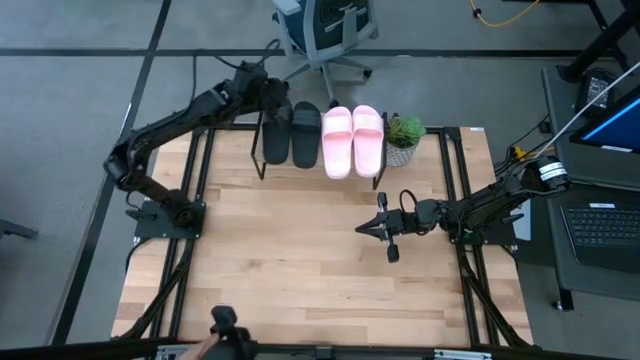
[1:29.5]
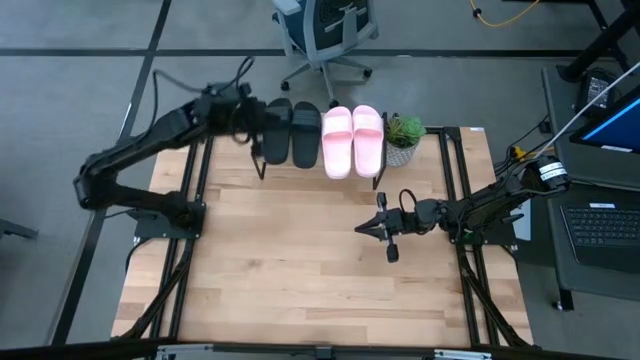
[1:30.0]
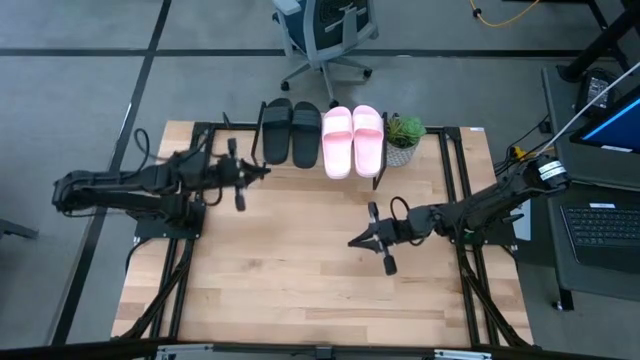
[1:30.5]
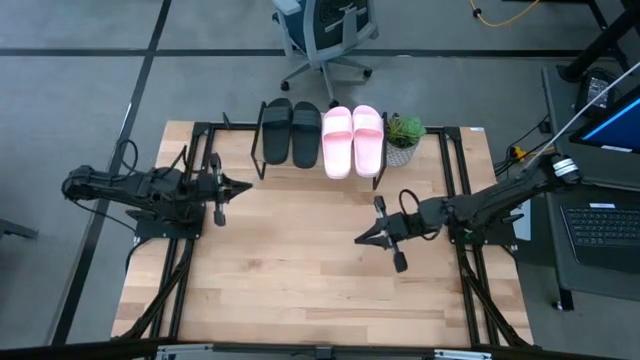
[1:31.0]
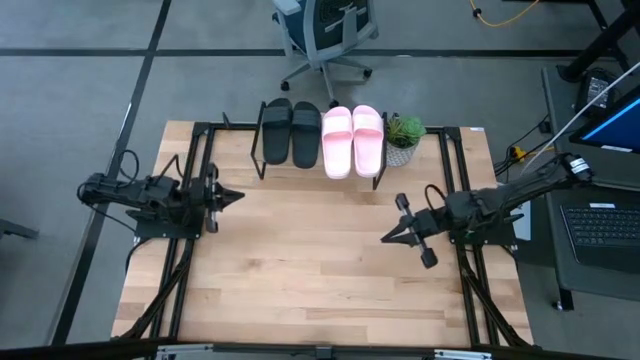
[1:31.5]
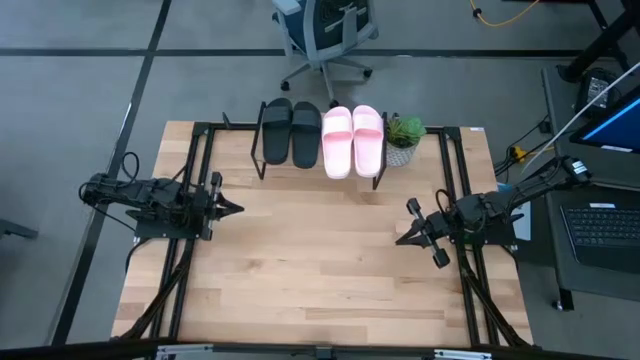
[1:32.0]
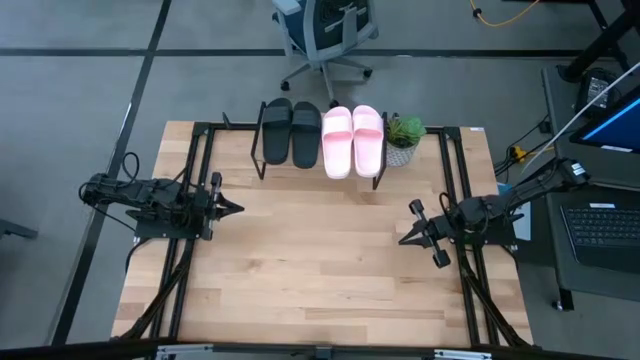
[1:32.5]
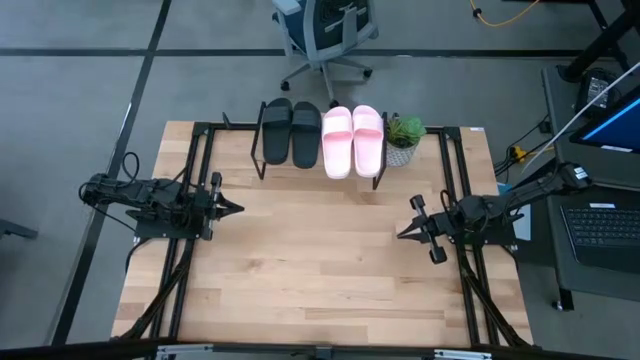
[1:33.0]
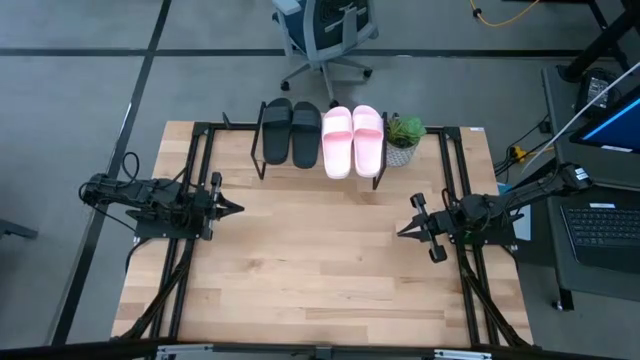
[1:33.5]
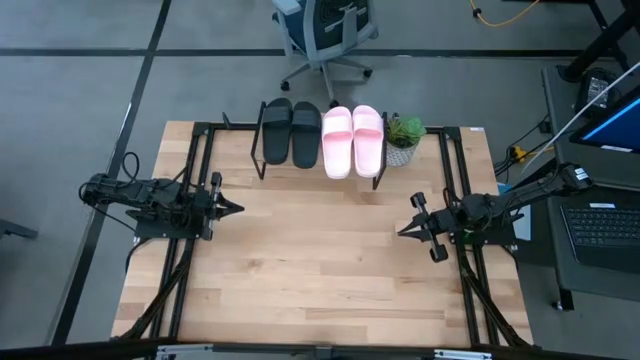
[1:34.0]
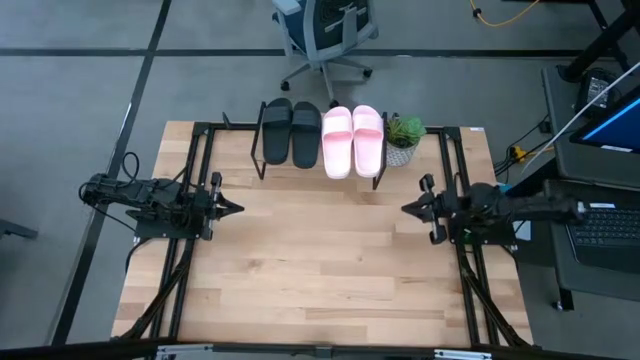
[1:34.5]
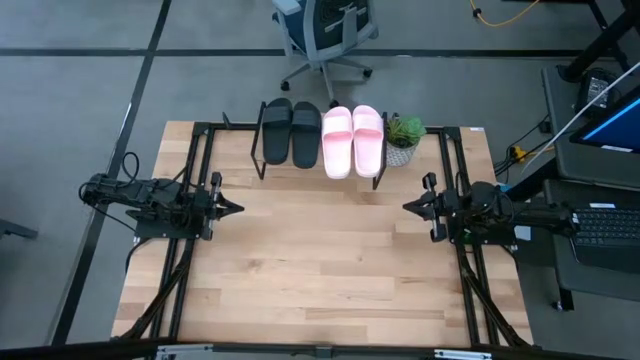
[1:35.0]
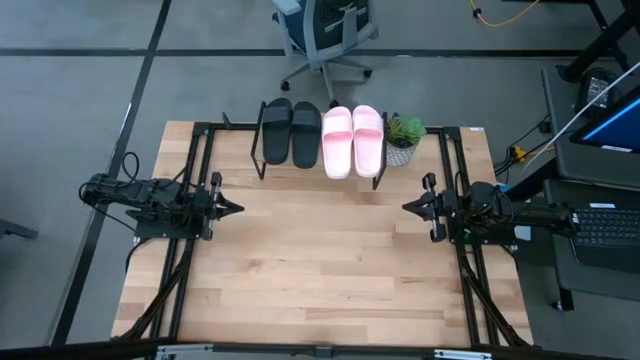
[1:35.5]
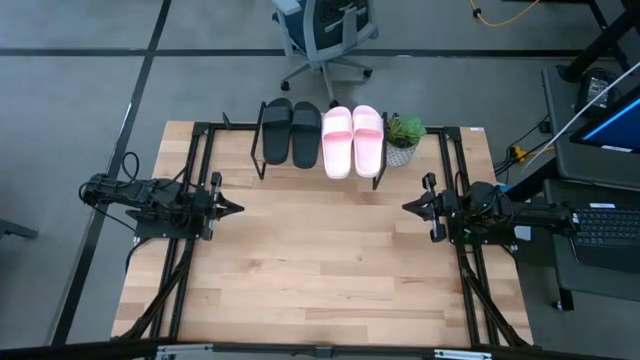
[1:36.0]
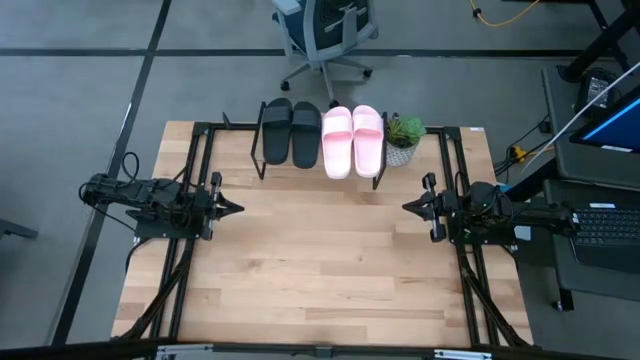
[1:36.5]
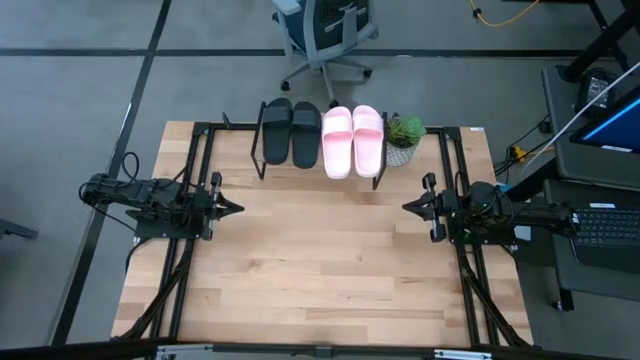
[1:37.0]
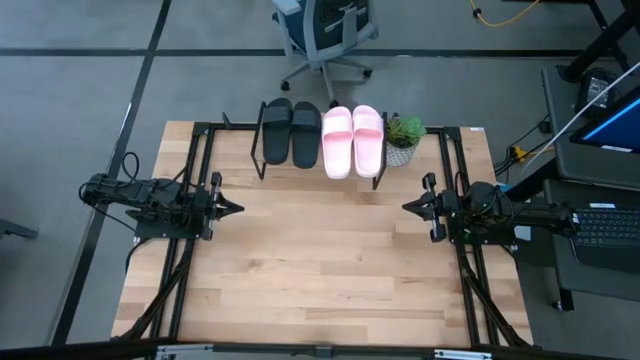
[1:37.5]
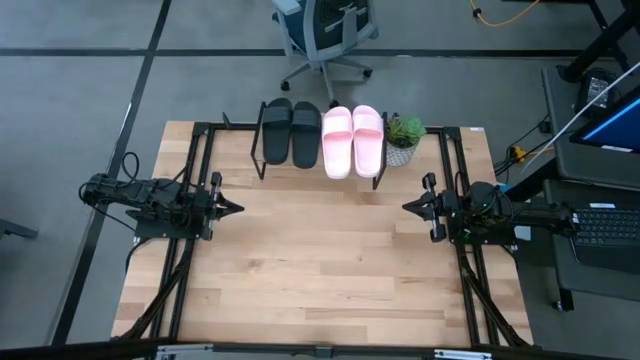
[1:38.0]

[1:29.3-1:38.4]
Task: Pick and place slides into the shelf
Return to Home Position

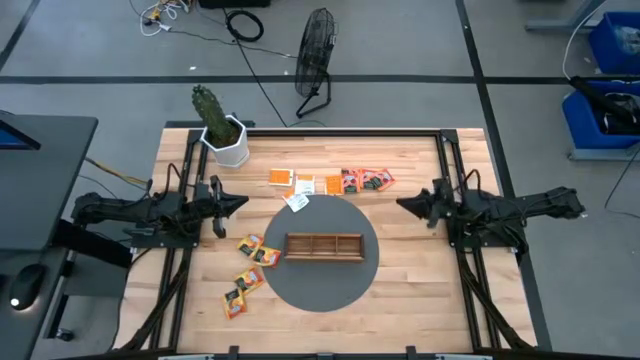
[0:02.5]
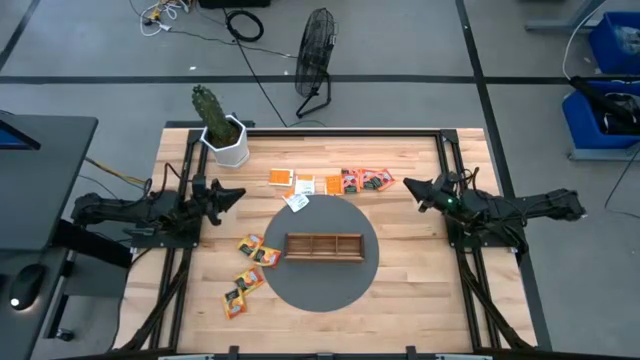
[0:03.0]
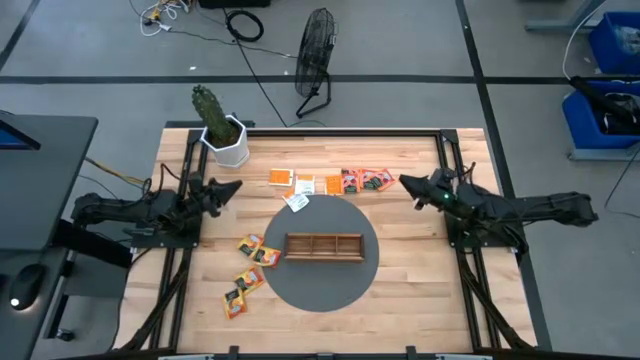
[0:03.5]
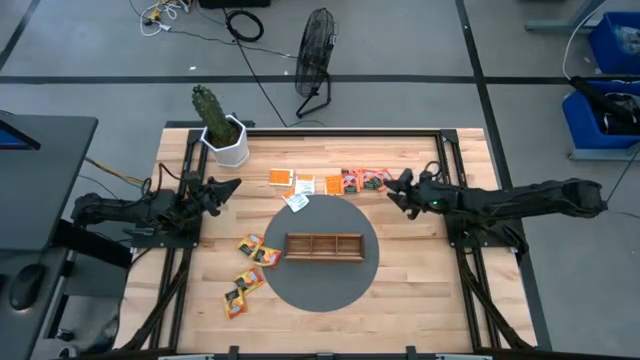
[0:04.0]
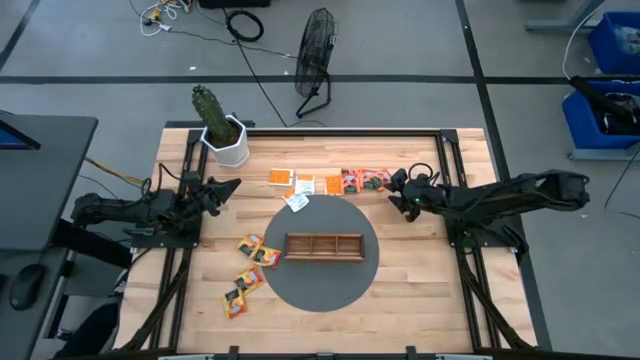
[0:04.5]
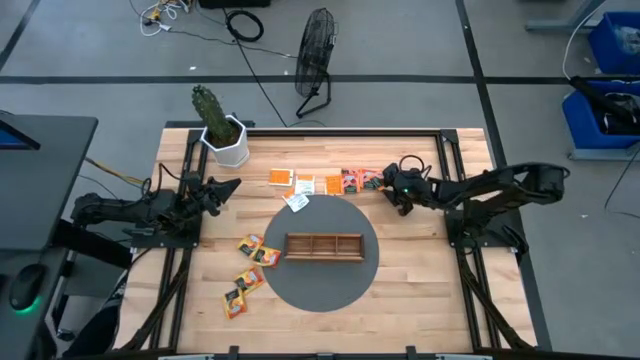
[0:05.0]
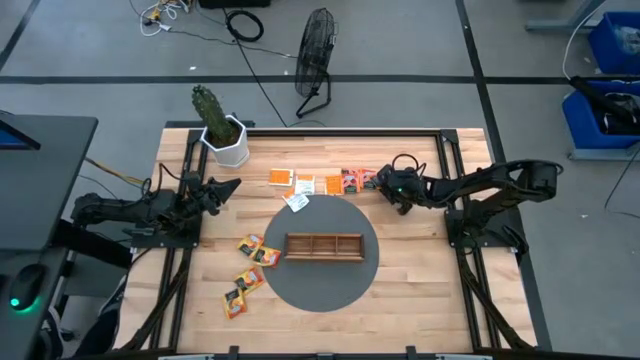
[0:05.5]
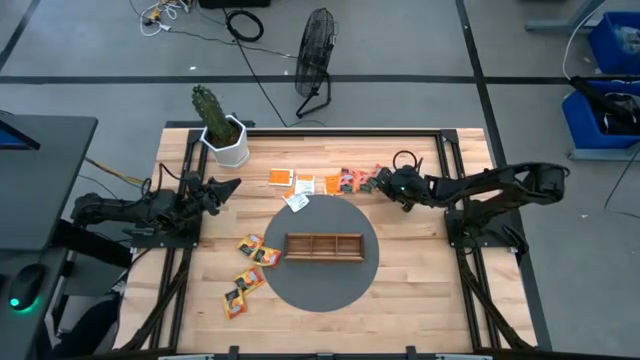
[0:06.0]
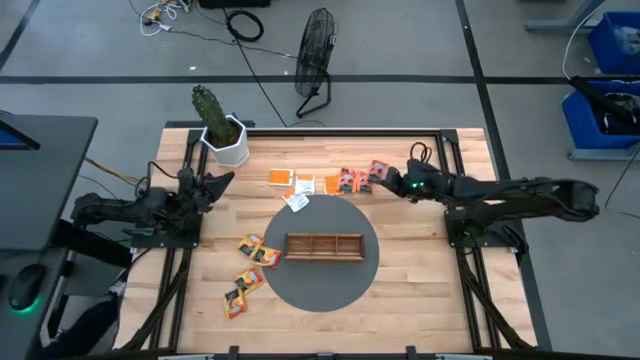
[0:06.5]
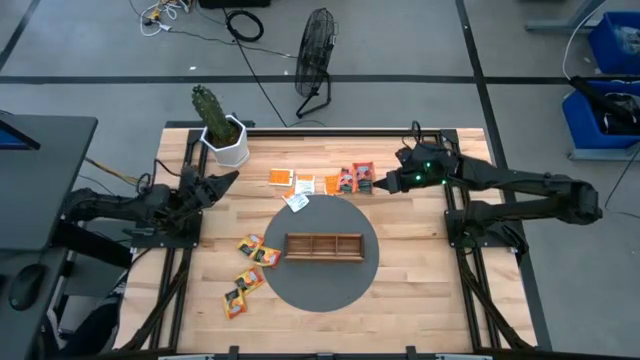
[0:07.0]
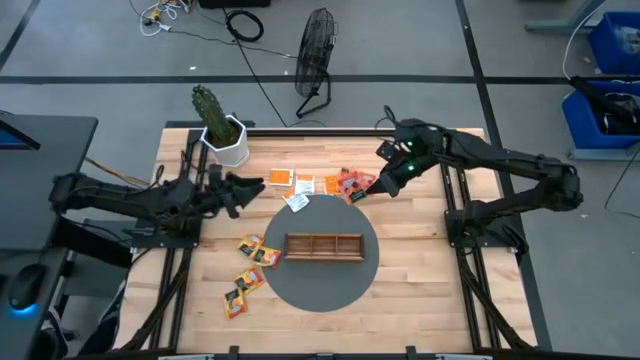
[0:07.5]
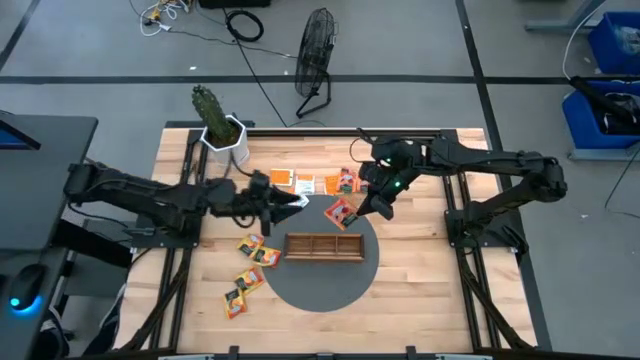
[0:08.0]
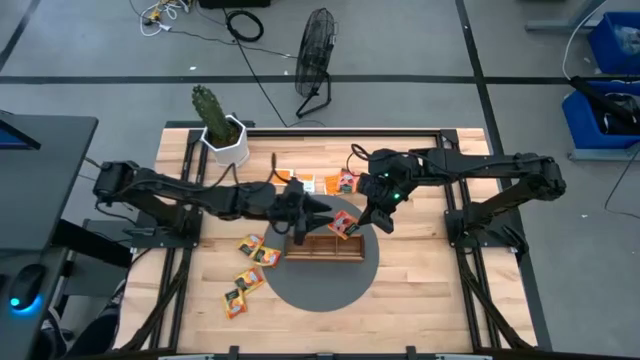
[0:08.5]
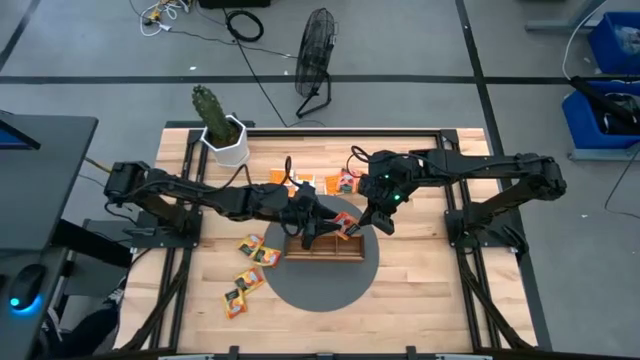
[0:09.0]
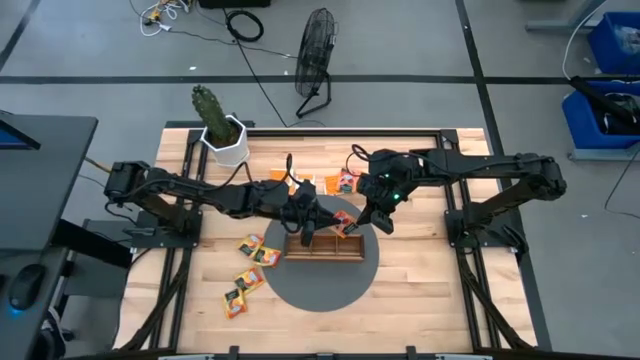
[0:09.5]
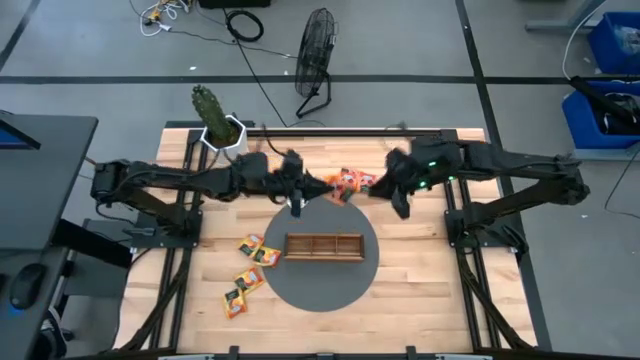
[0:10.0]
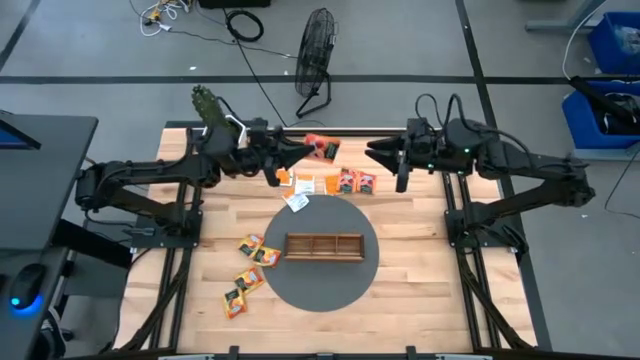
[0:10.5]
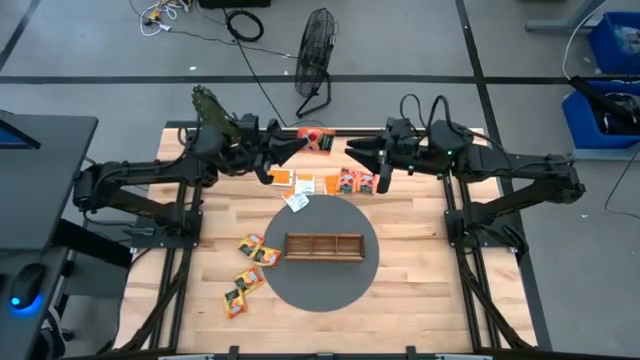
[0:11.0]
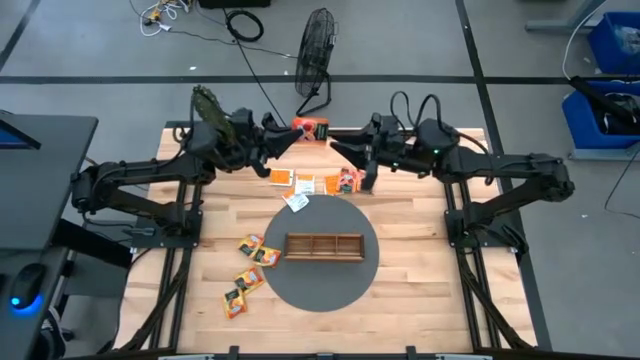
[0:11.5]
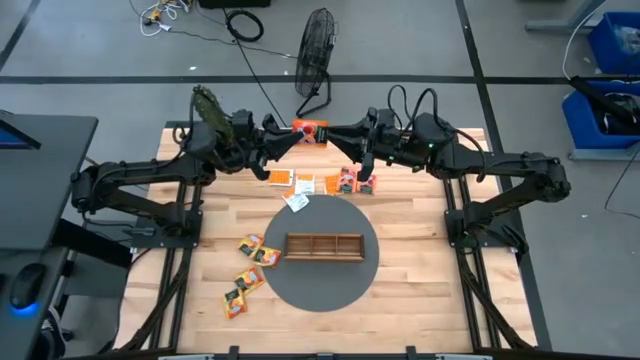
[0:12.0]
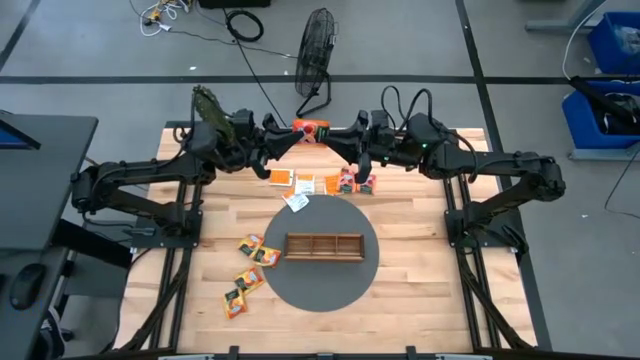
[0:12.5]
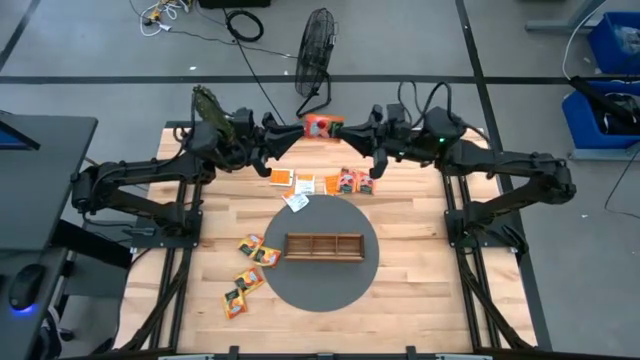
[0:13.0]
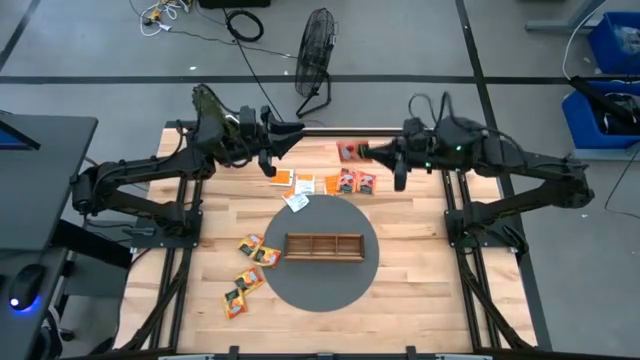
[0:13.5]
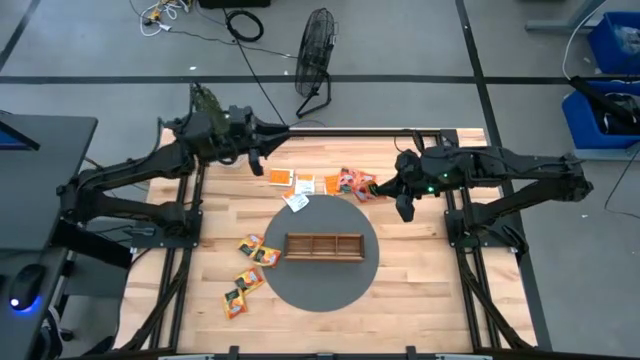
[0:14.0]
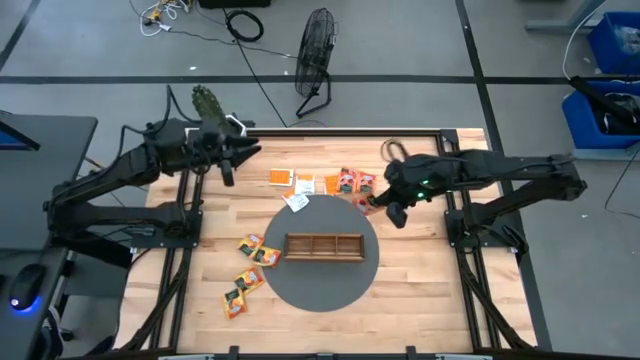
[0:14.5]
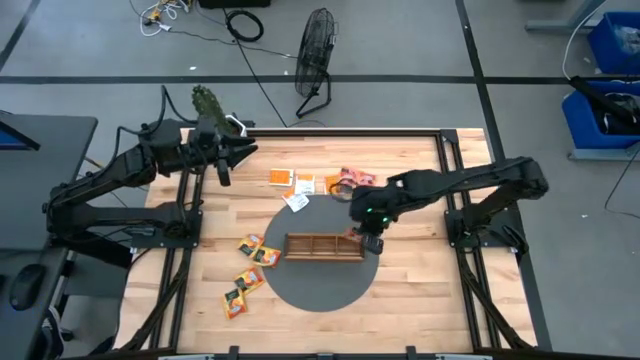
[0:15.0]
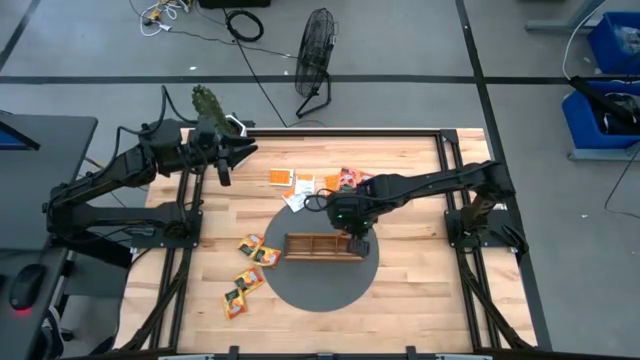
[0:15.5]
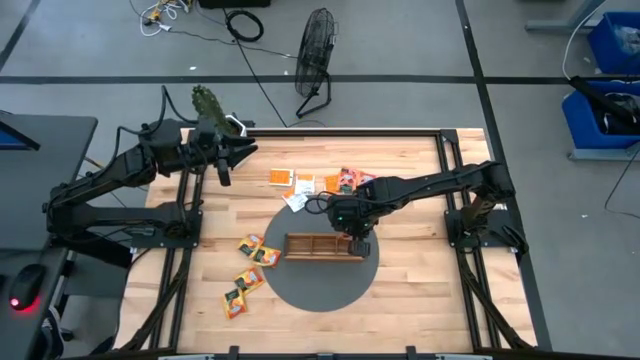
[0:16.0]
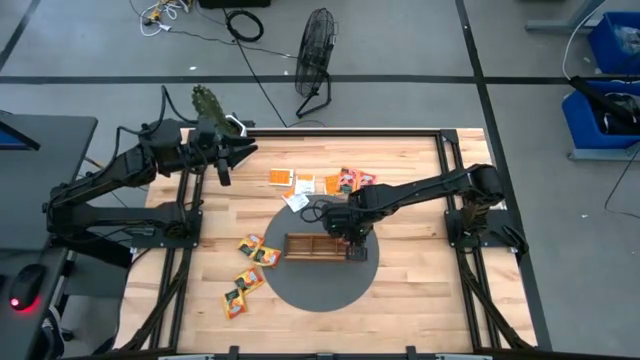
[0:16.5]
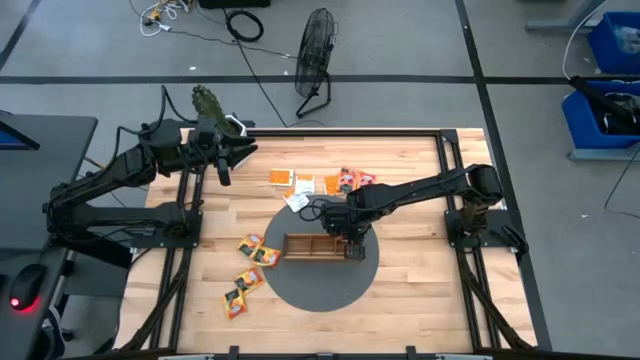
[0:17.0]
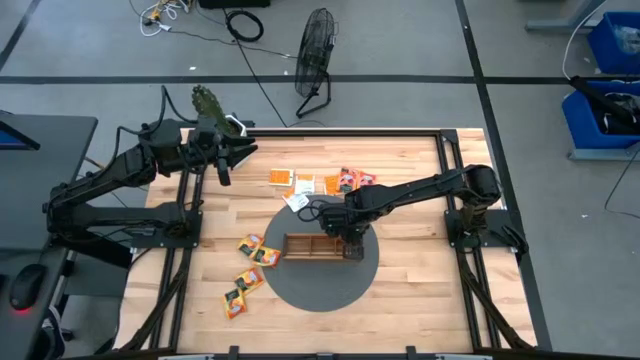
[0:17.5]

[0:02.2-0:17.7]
Task: Pick & Place Tea
Put the red tea bag into the right section of the wooden organizer
